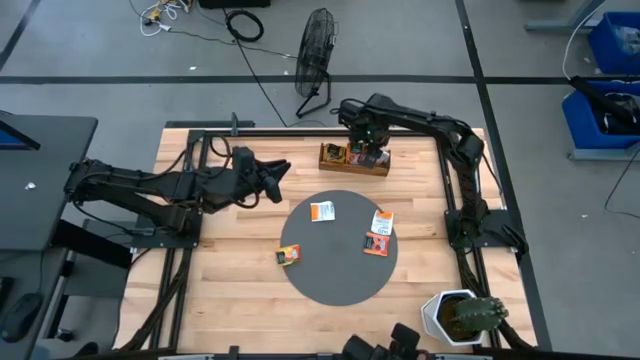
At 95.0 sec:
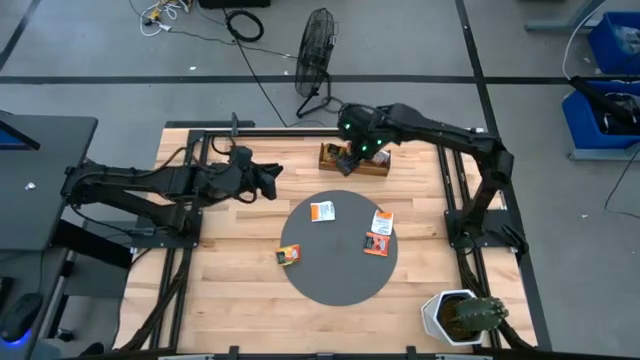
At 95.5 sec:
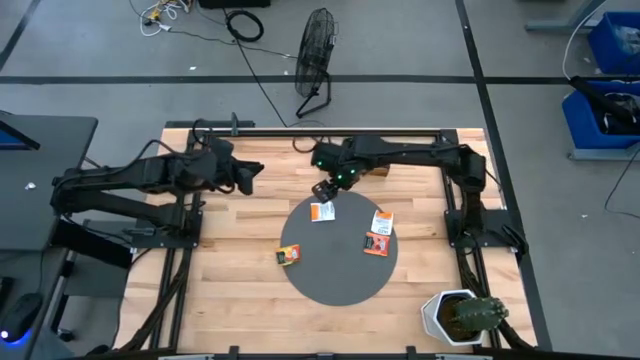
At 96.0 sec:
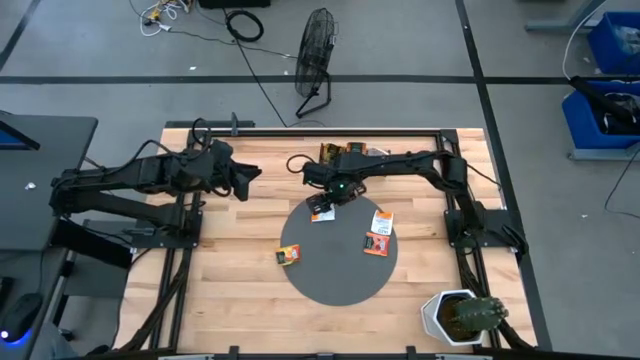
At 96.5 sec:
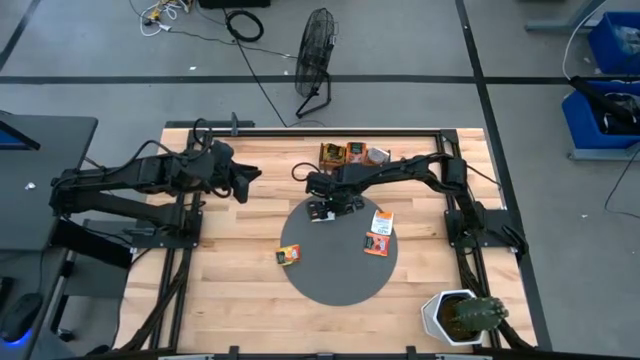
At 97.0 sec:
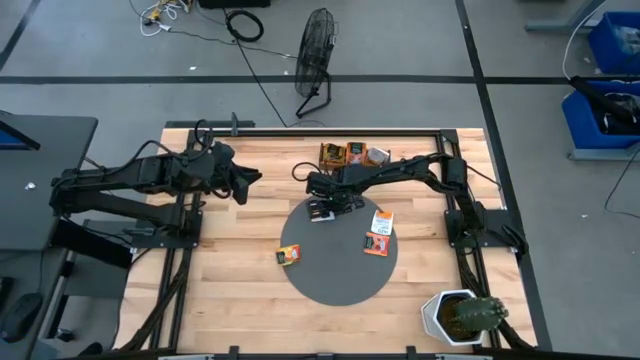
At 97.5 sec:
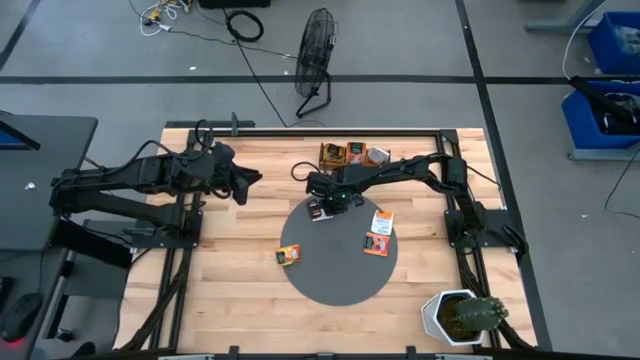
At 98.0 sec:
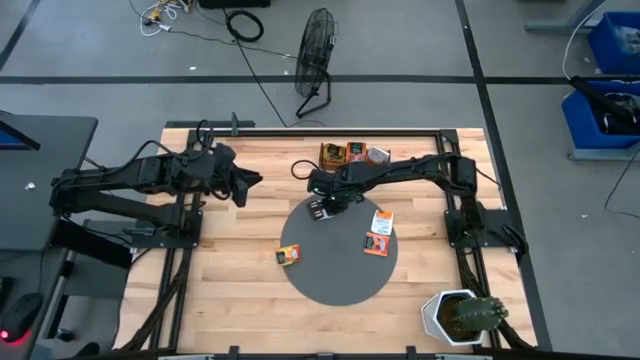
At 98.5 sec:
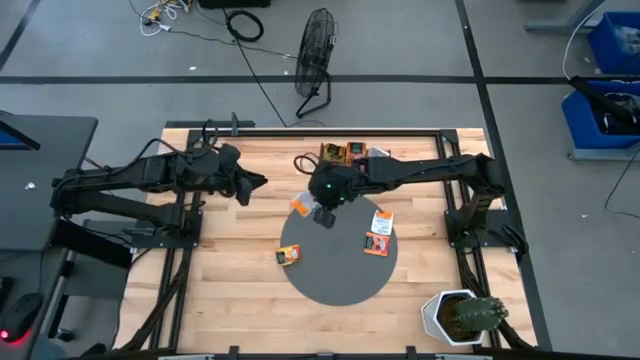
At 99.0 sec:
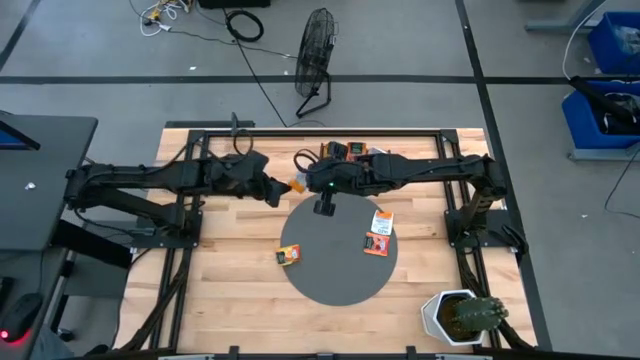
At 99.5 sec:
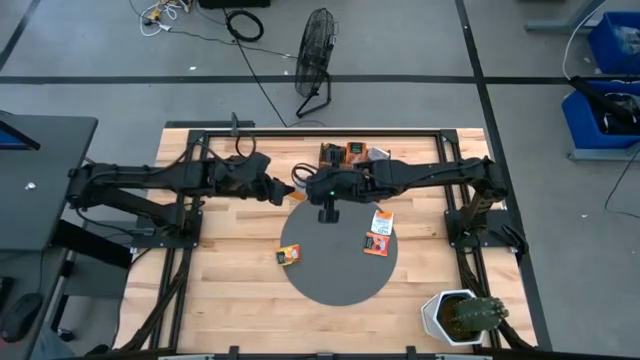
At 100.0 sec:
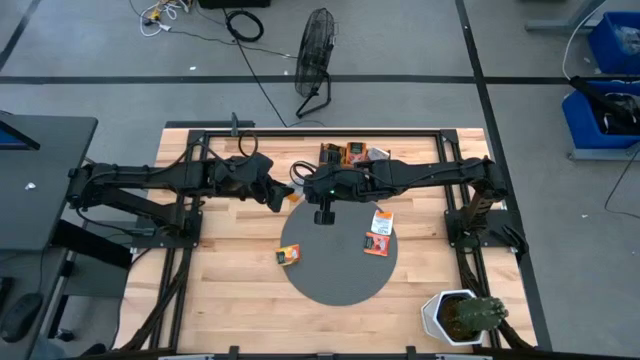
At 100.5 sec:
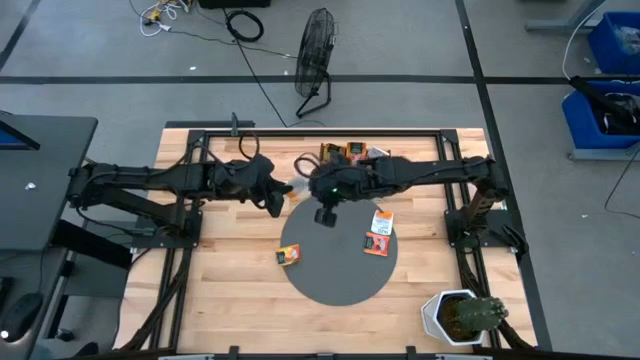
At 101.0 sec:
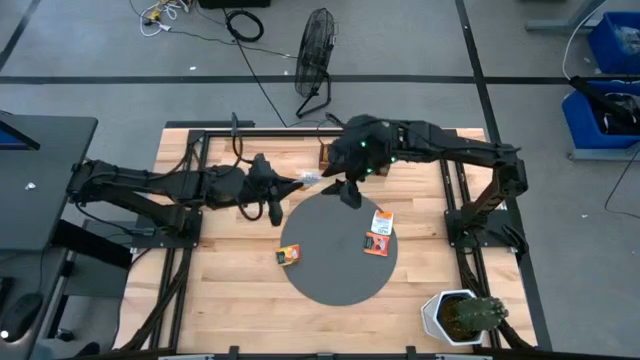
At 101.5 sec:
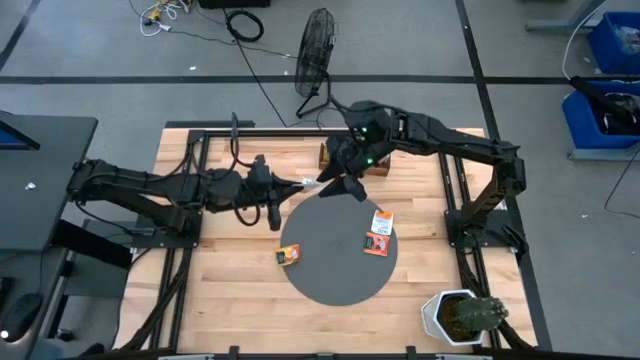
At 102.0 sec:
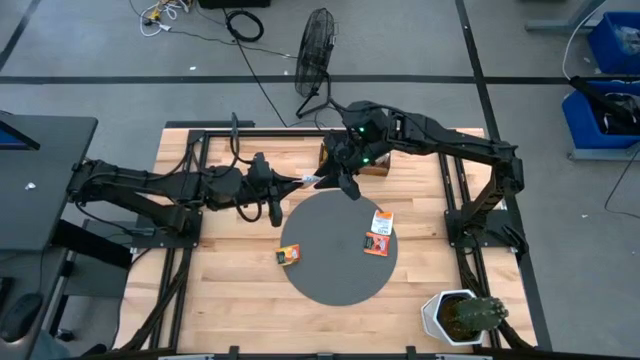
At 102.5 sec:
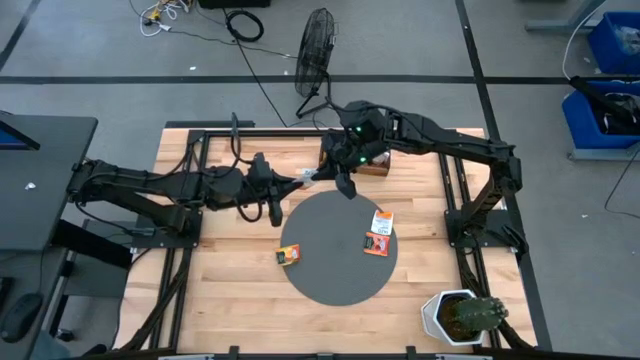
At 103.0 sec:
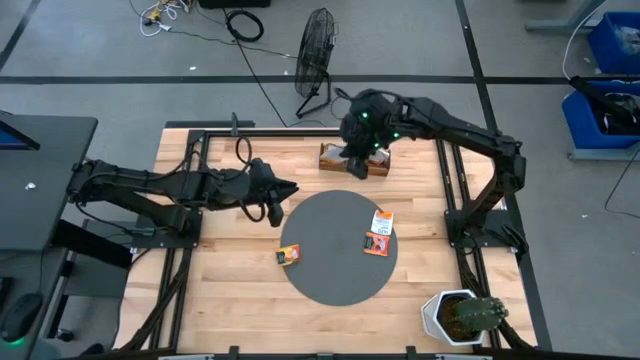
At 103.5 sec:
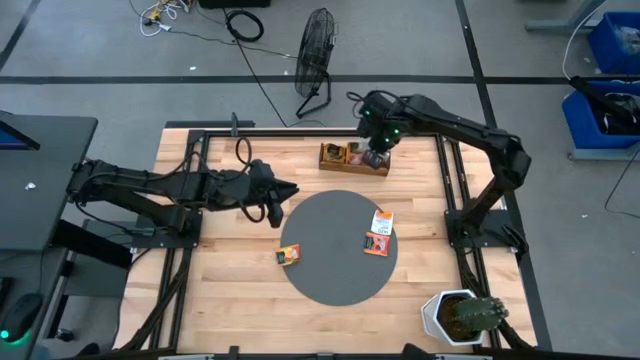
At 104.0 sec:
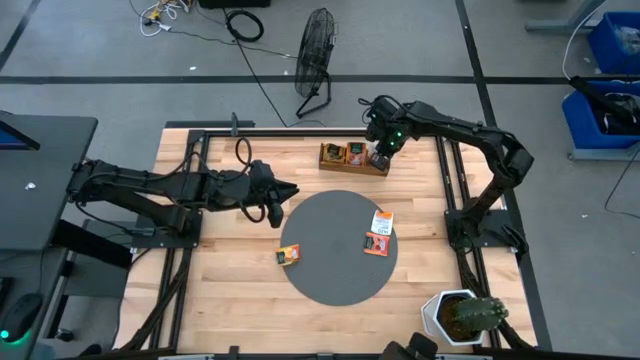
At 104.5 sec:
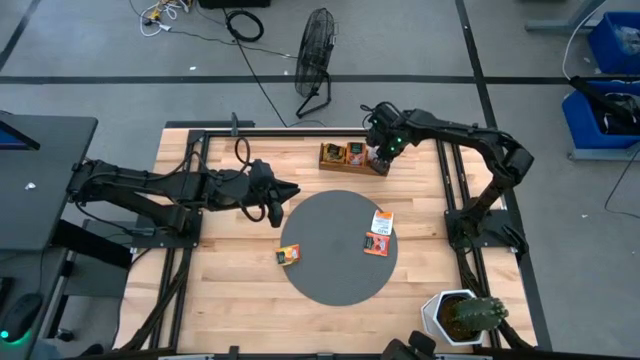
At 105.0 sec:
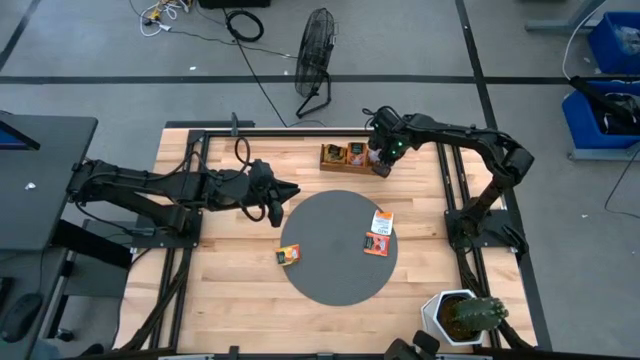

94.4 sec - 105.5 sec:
Task: Pick & Place Tea
Put the white tea bag into the right section of the wooden organizer

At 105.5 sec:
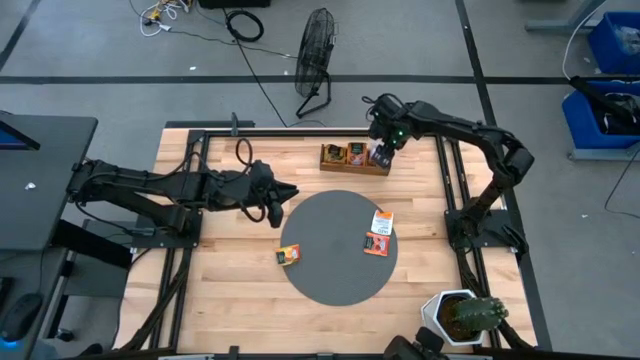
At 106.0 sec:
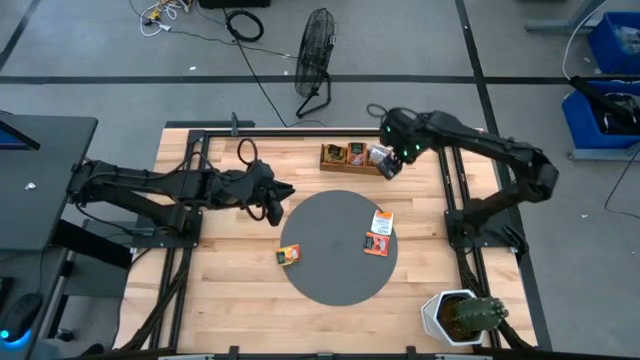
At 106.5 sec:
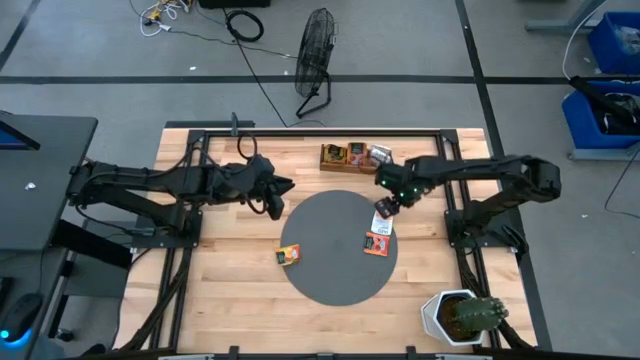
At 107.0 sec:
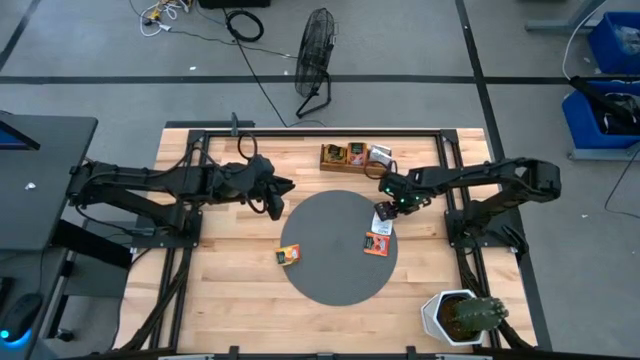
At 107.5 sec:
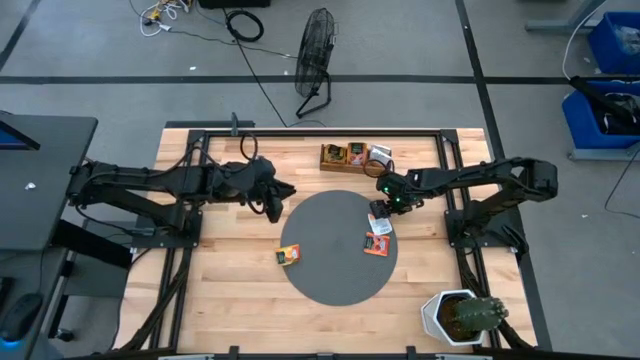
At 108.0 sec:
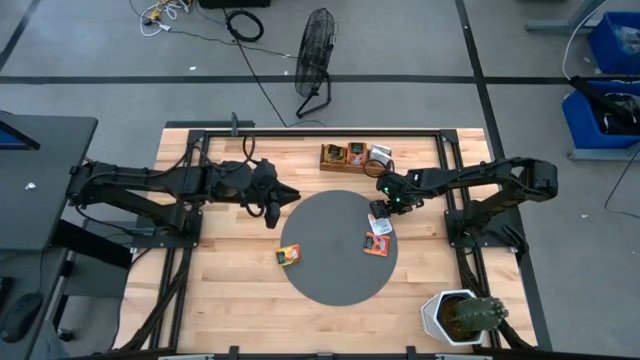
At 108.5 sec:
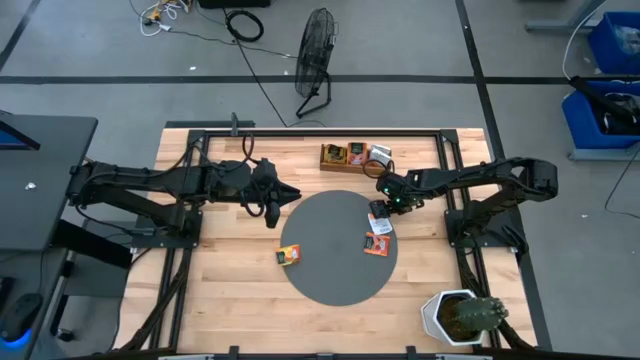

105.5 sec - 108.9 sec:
Put the white tea bag into the right section of the wooden organizer
